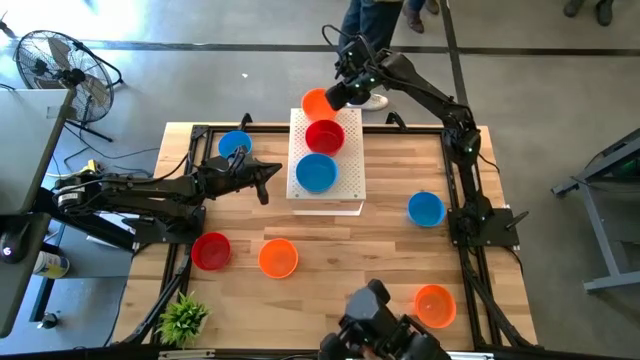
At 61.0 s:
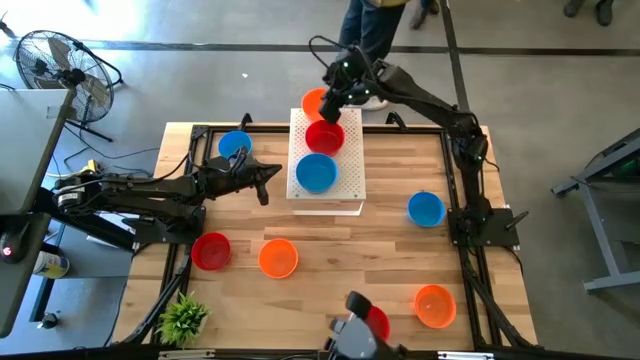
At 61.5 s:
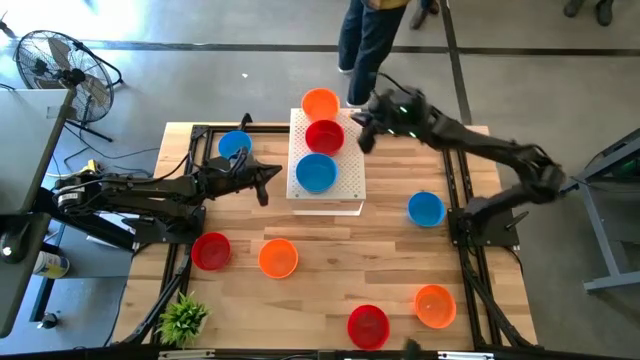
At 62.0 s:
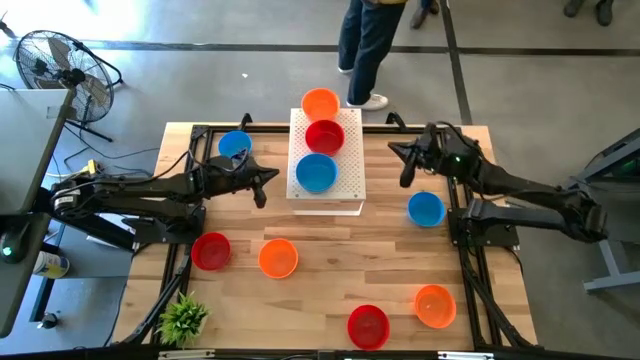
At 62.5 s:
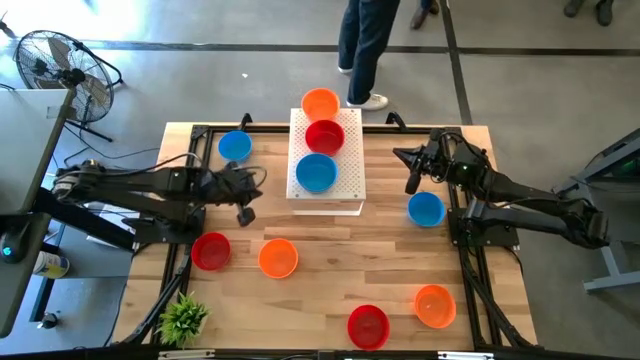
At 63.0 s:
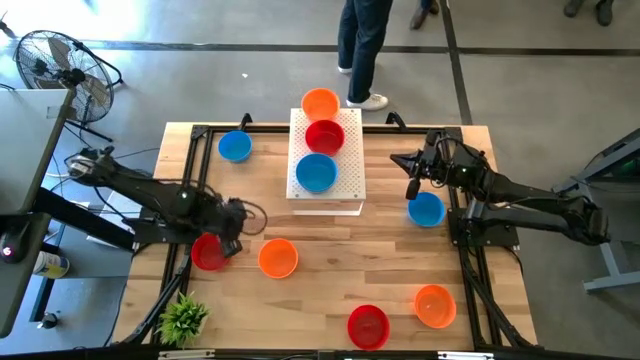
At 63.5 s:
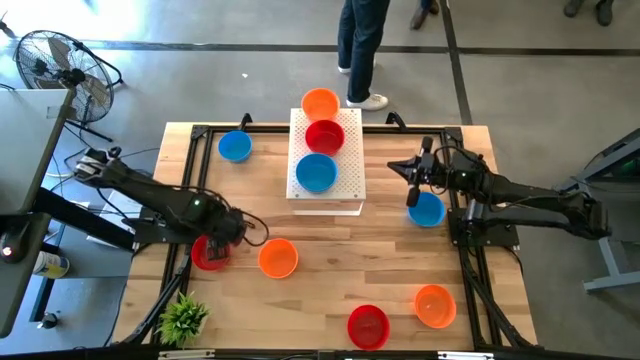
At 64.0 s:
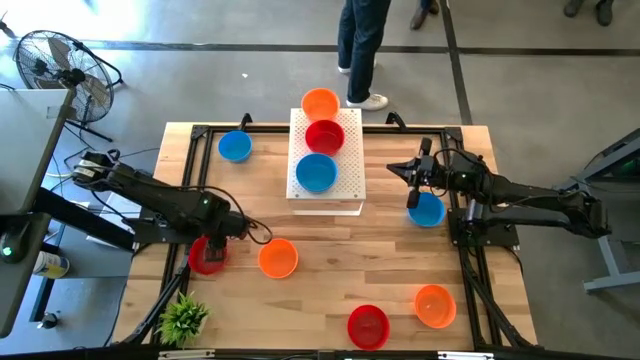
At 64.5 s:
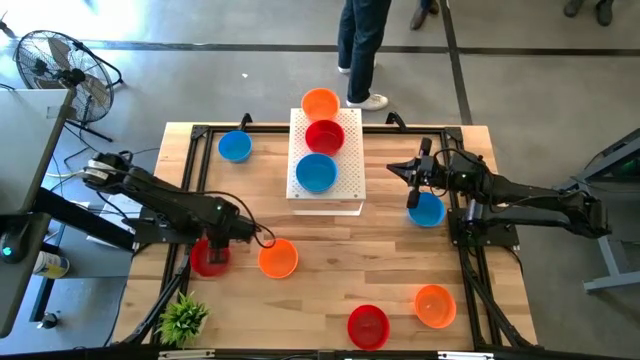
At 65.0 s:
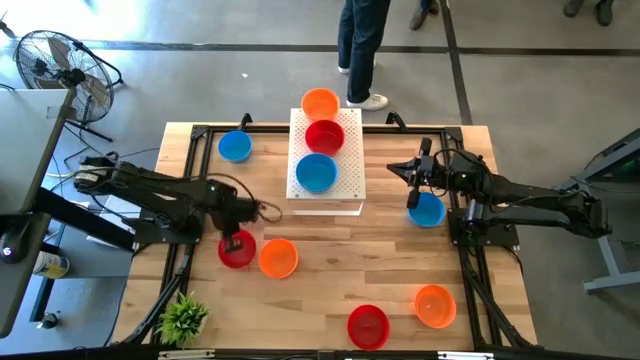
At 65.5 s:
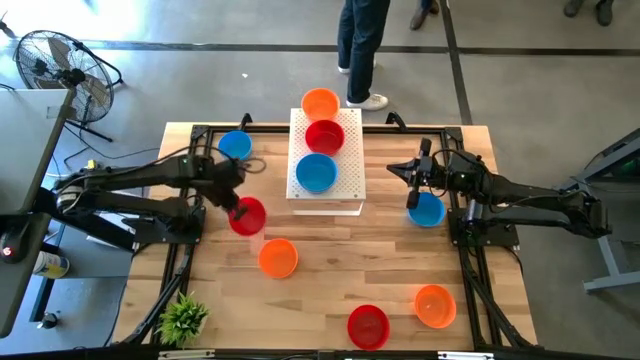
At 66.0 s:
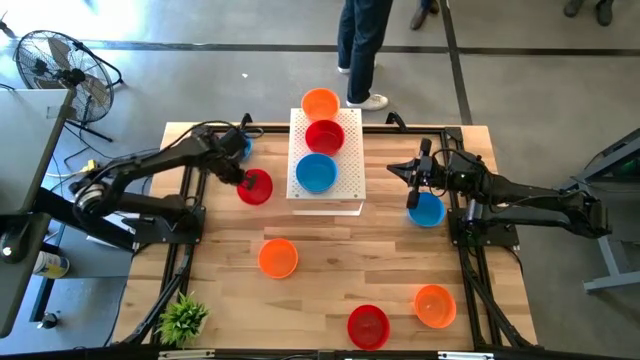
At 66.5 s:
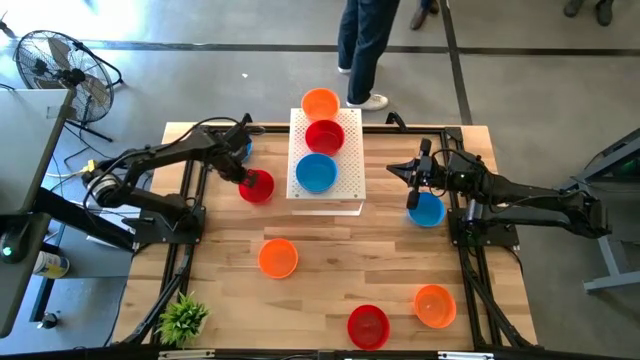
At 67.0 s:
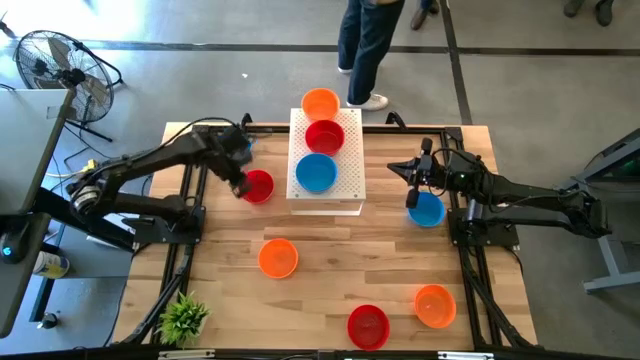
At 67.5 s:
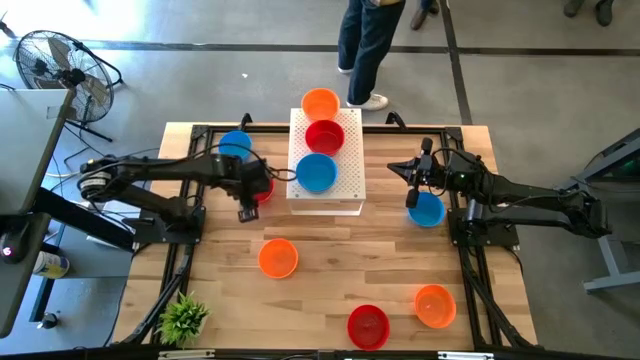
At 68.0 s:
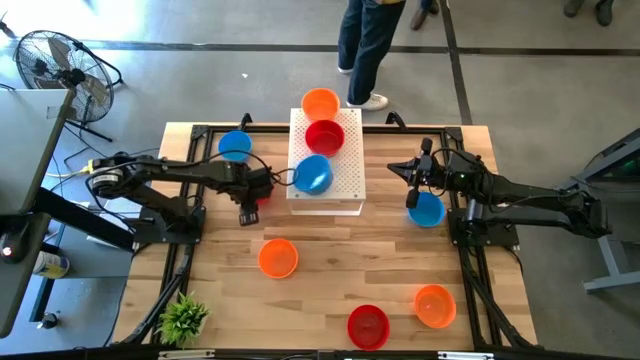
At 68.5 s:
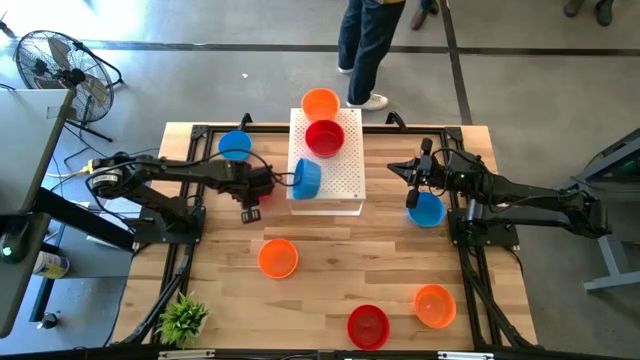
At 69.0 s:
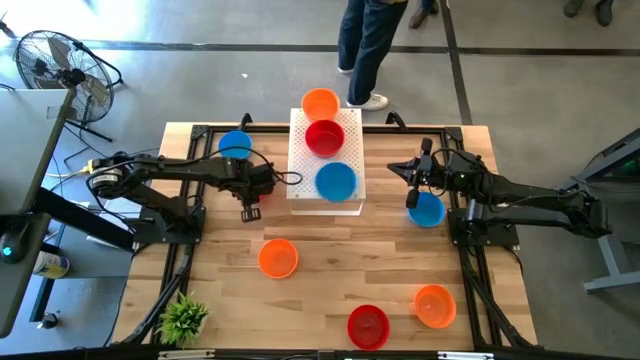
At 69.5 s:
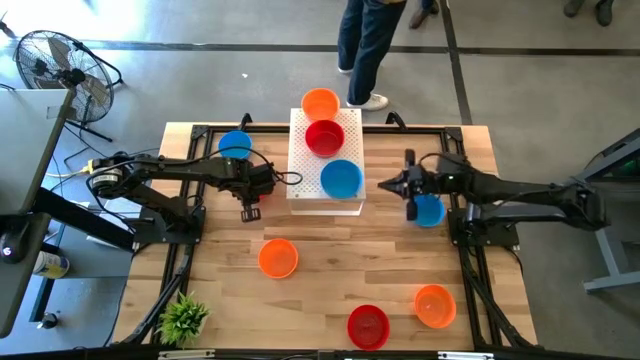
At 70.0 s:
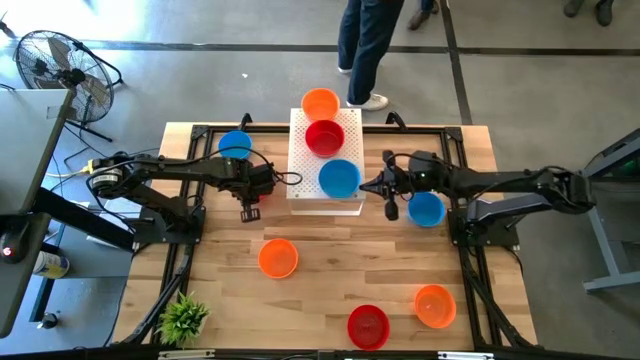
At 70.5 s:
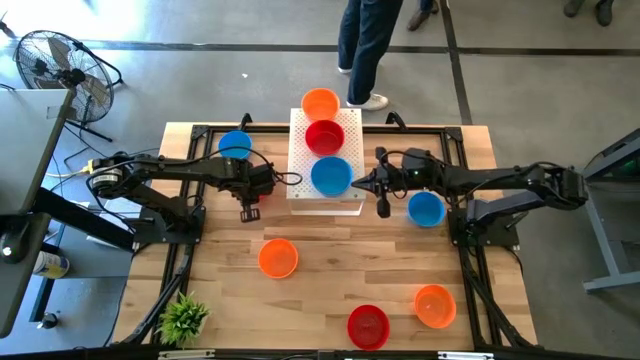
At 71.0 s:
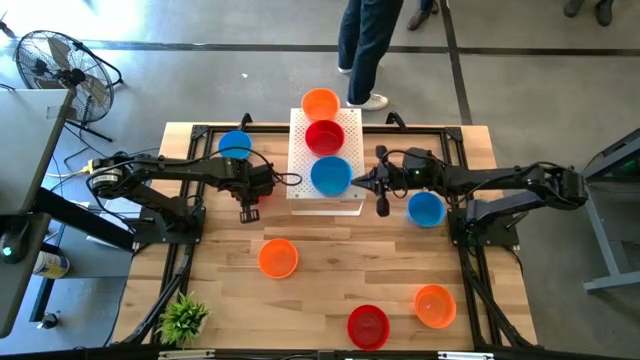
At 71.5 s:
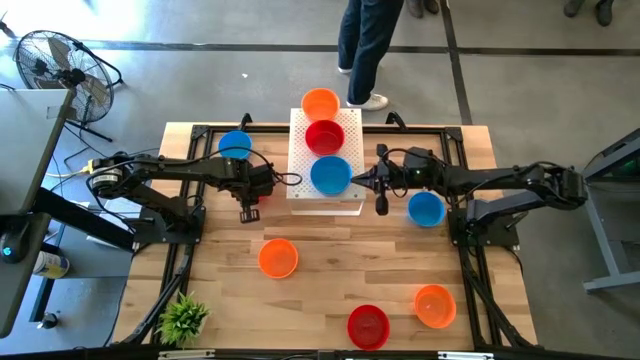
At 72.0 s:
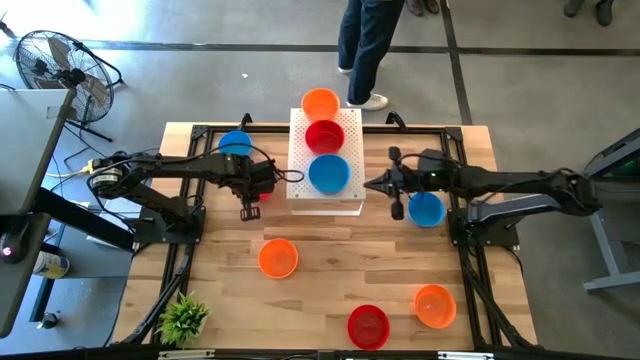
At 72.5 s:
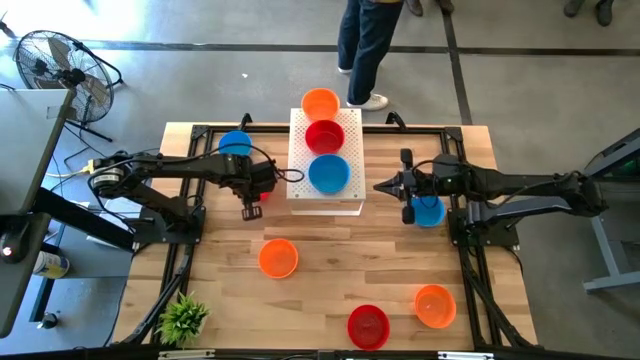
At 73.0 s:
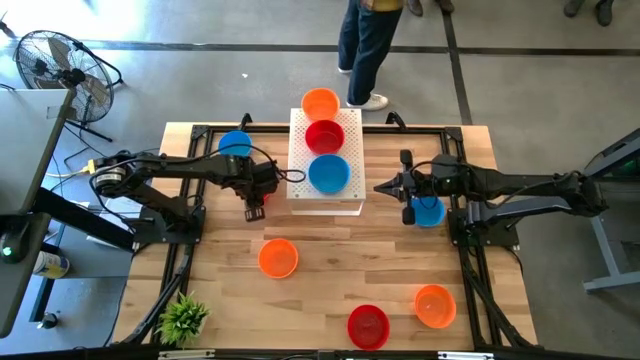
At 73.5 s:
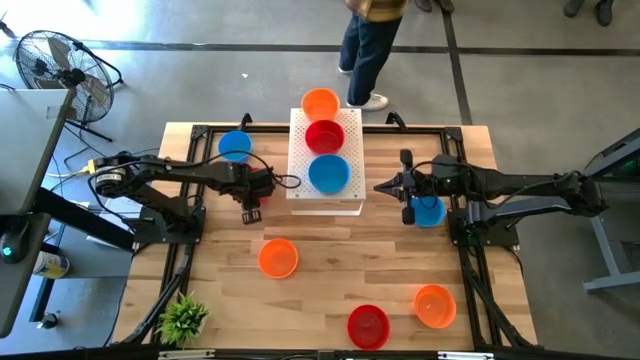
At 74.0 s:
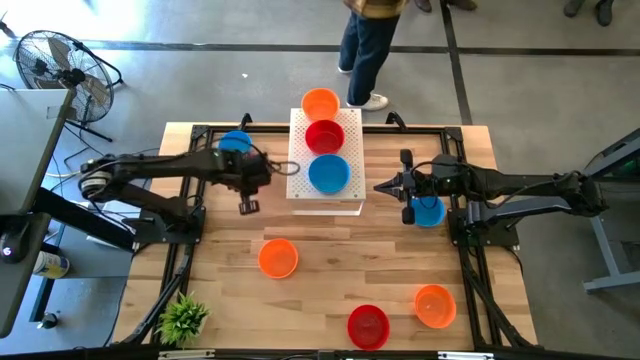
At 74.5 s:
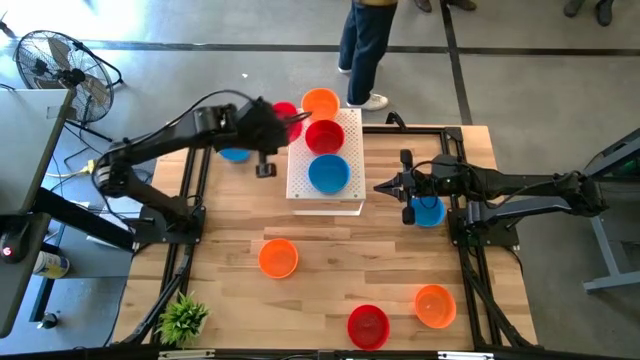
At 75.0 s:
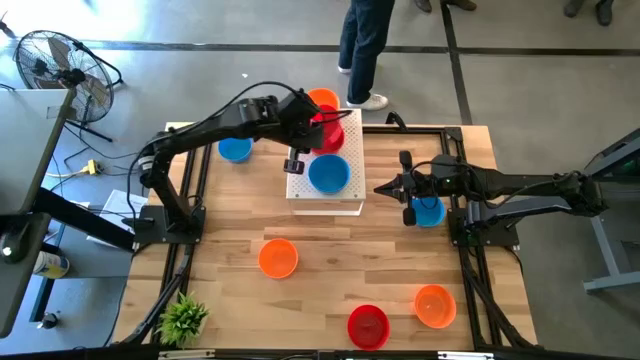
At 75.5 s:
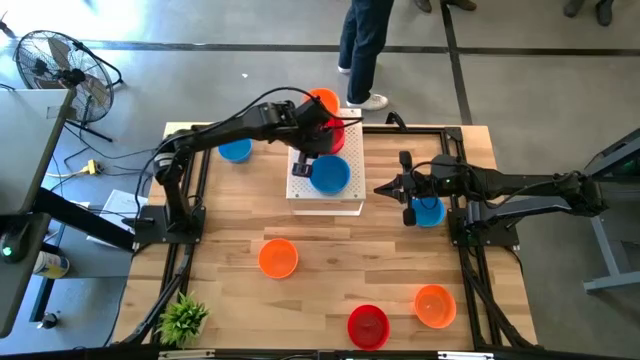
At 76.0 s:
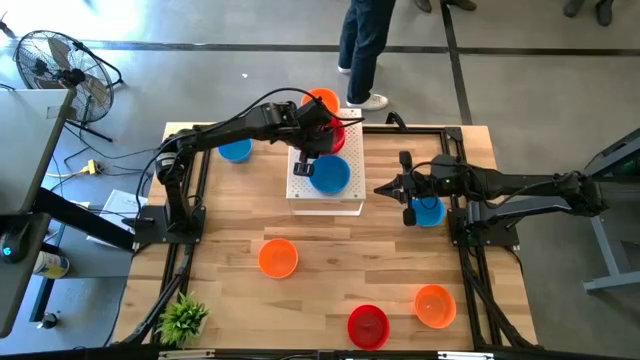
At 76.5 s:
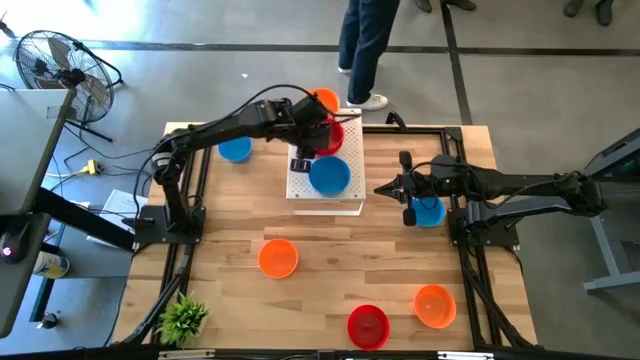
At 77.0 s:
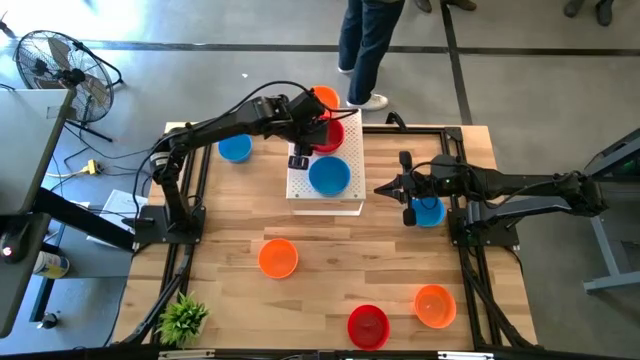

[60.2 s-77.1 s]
Task: Pick & Place Mini bowls
Stack the red bowl on top of the other red bowls on the shelf

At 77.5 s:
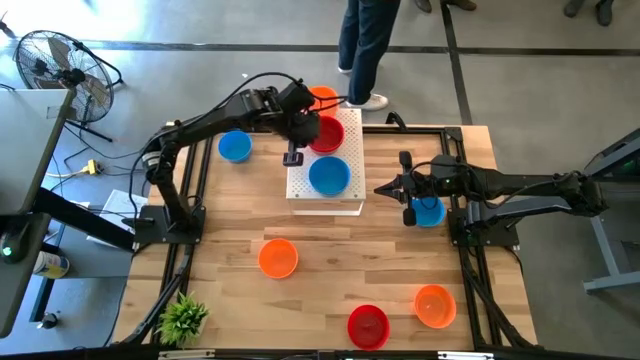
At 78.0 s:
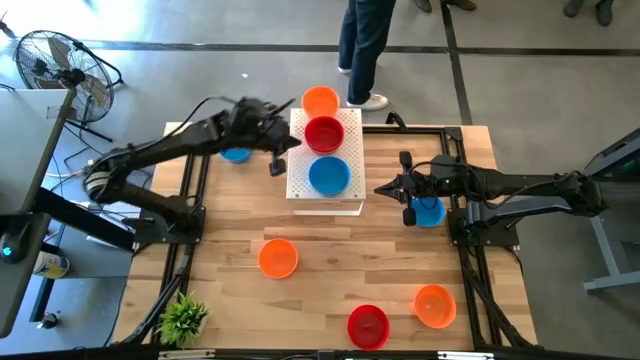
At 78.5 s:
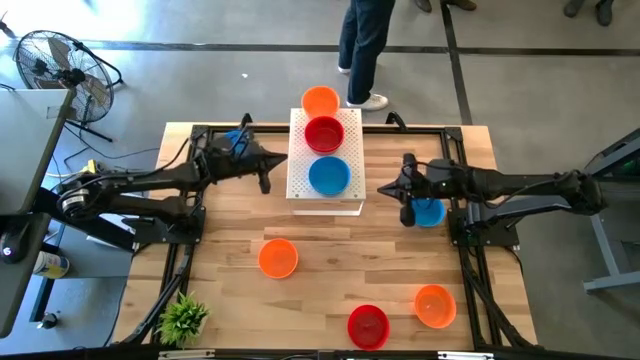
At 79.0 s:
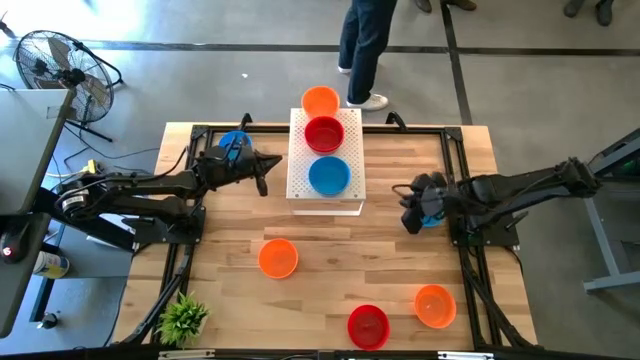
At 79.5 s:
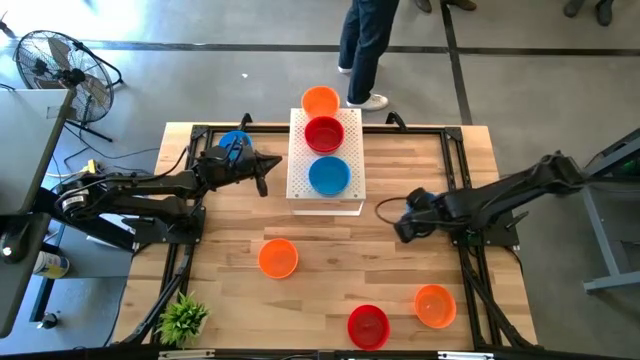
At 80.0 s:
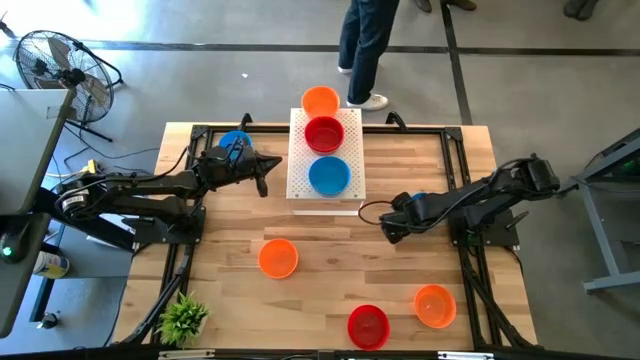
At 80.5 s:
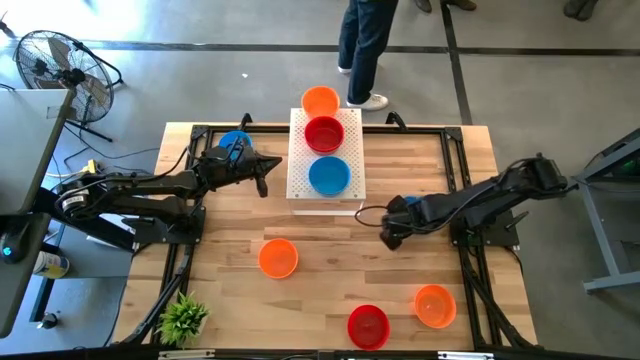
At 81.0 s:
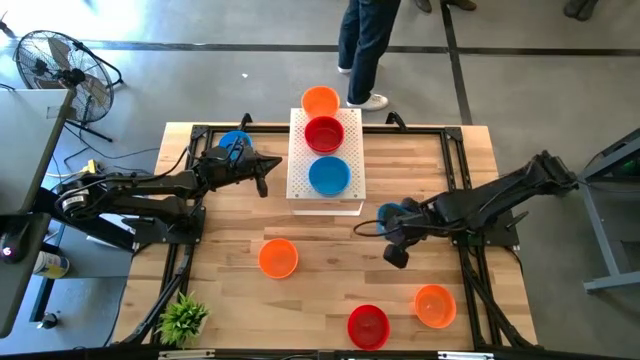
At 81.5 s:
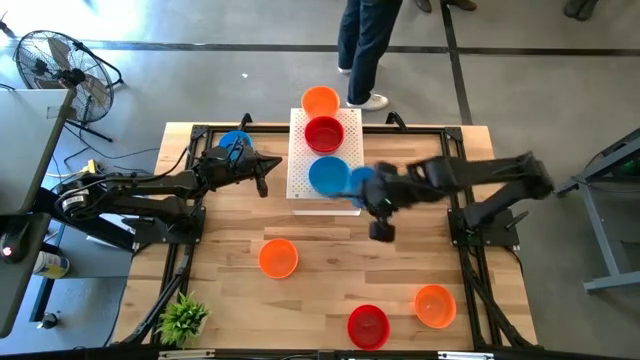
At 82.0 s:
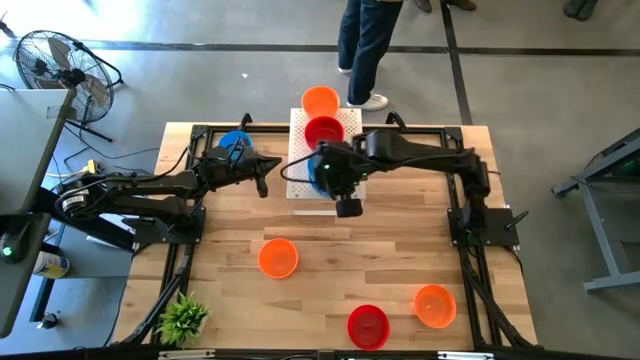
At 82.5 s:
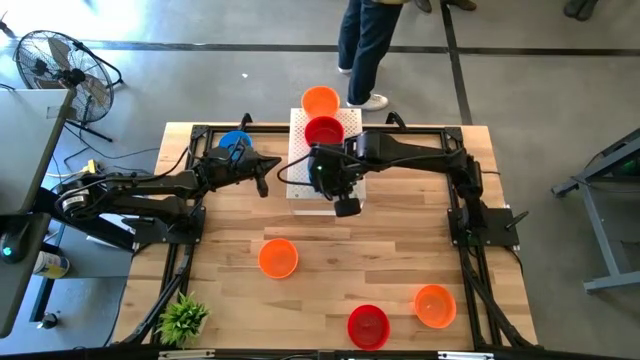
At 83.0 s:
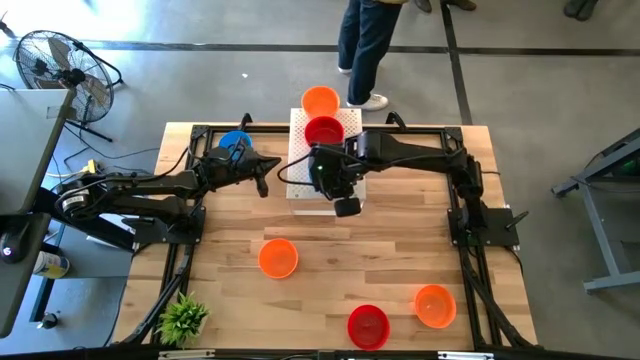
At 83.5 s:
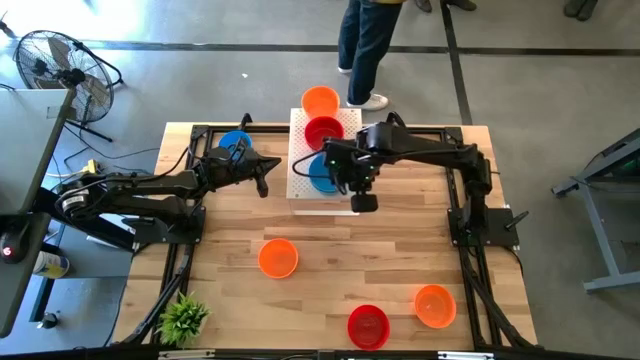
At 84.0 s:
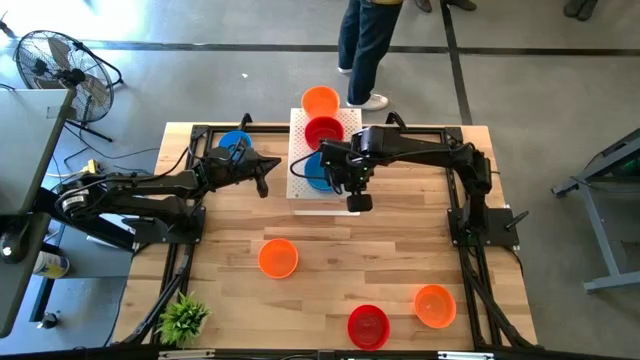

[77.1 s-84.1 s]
Stack the blue bowl on top of the other blue bowls on the shelf
